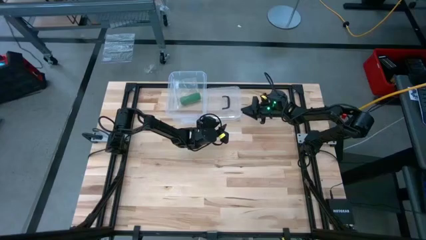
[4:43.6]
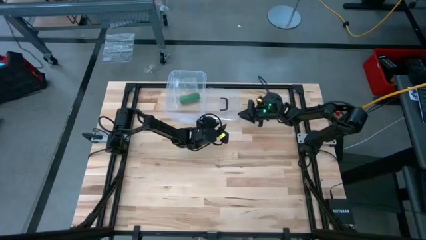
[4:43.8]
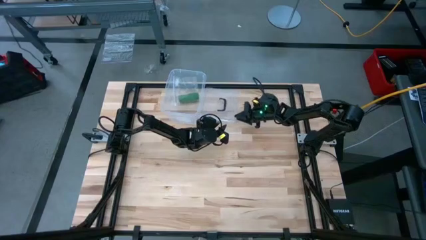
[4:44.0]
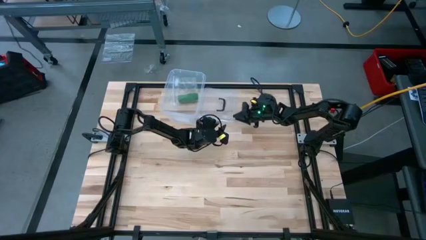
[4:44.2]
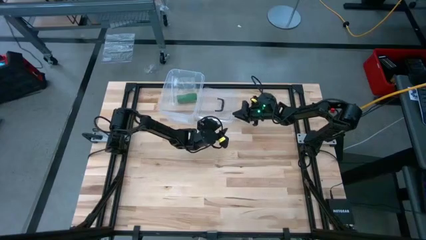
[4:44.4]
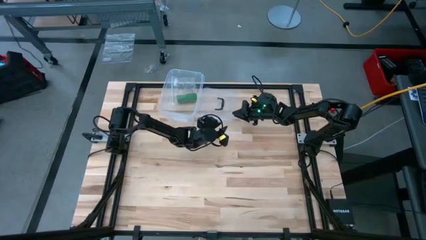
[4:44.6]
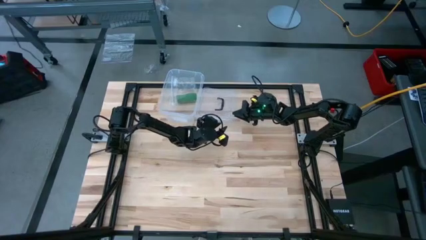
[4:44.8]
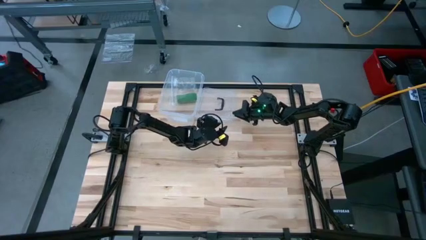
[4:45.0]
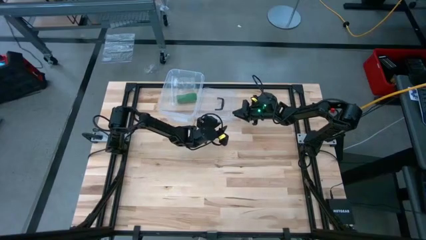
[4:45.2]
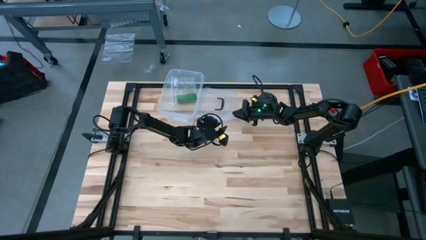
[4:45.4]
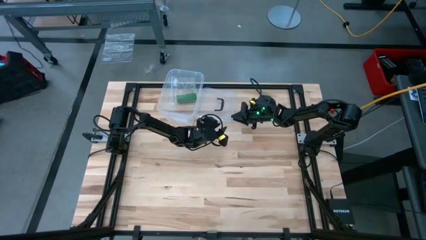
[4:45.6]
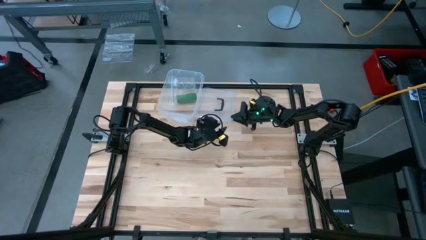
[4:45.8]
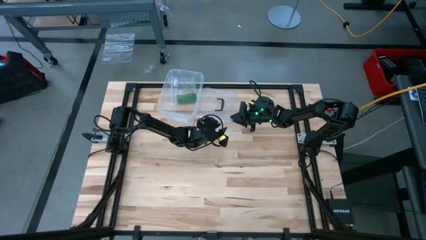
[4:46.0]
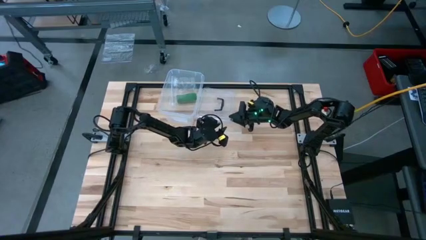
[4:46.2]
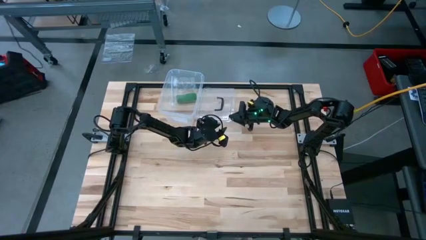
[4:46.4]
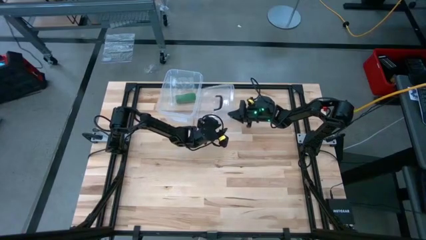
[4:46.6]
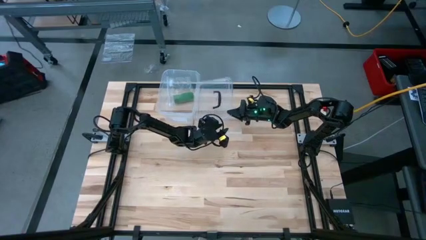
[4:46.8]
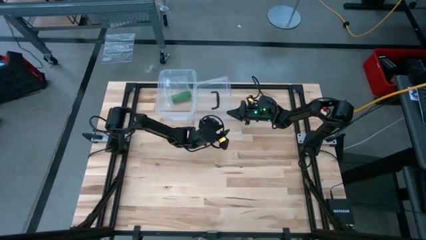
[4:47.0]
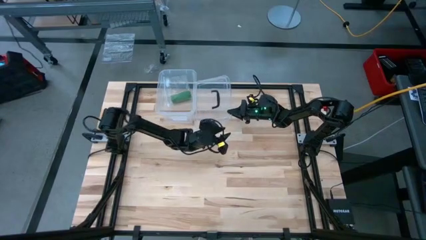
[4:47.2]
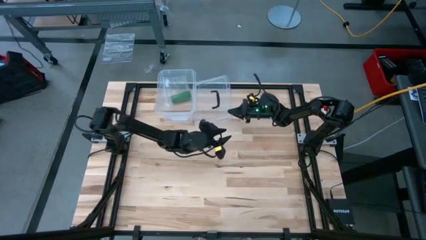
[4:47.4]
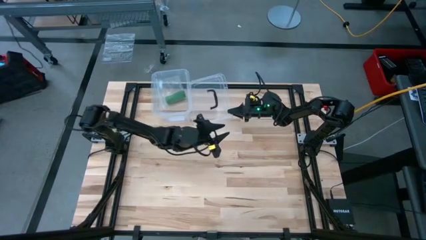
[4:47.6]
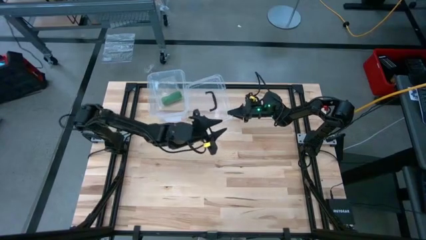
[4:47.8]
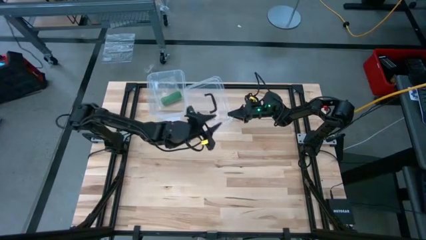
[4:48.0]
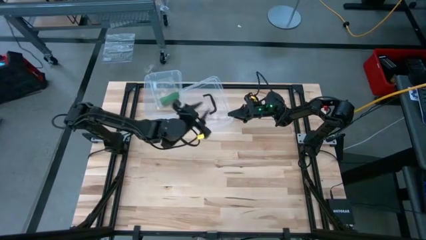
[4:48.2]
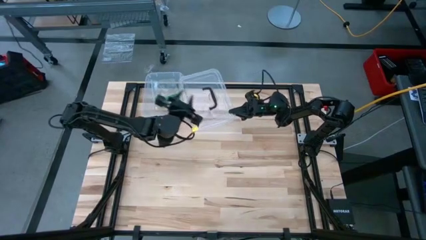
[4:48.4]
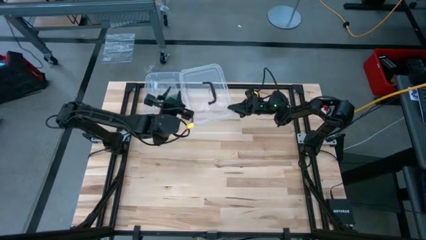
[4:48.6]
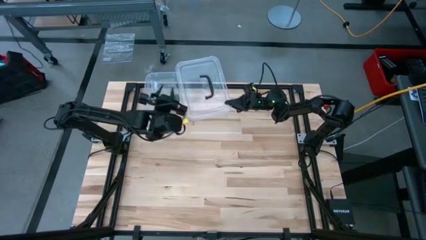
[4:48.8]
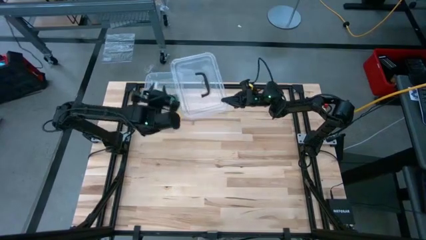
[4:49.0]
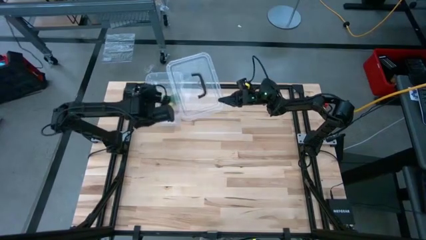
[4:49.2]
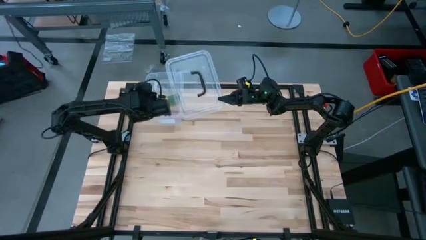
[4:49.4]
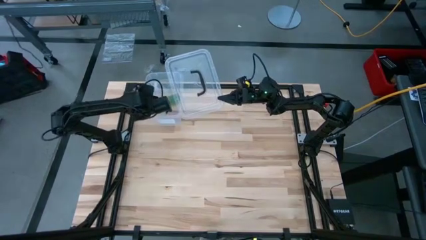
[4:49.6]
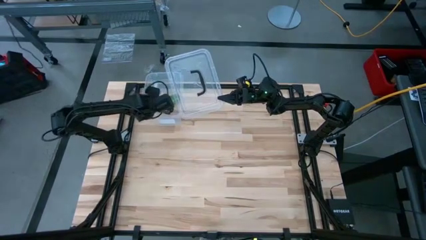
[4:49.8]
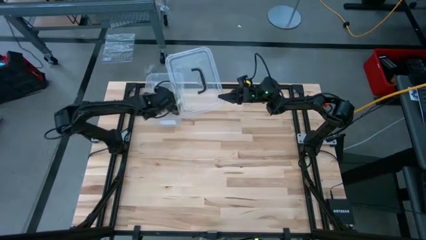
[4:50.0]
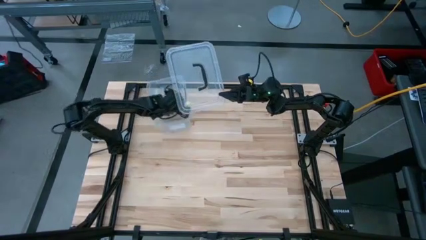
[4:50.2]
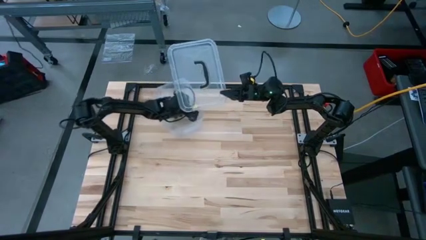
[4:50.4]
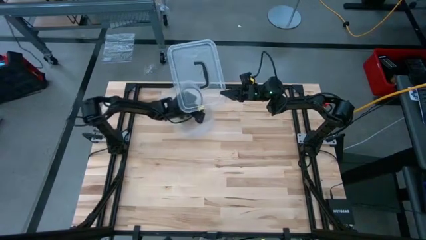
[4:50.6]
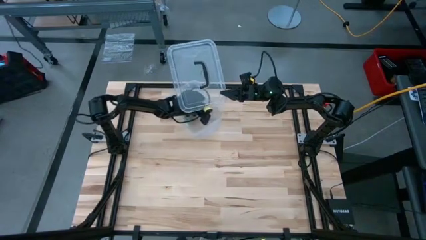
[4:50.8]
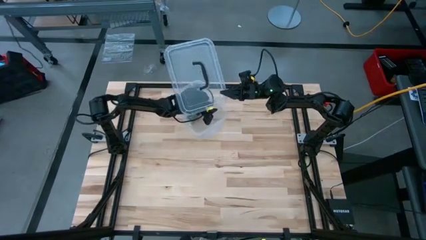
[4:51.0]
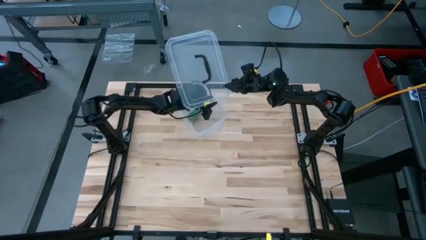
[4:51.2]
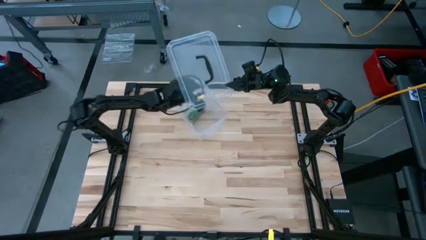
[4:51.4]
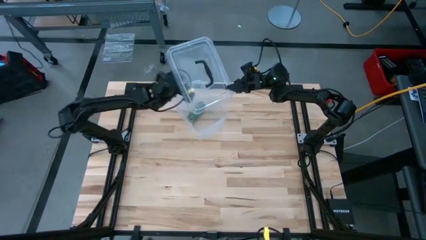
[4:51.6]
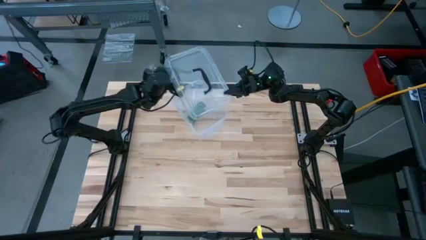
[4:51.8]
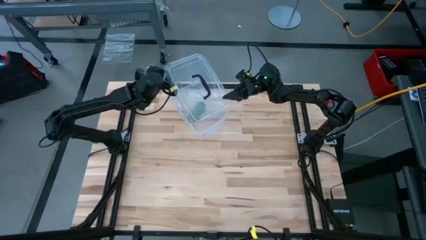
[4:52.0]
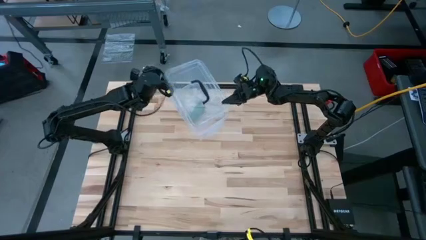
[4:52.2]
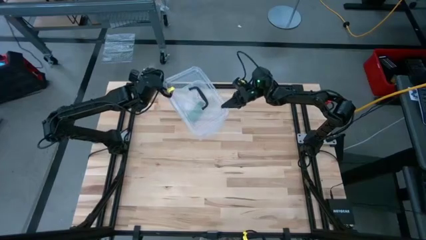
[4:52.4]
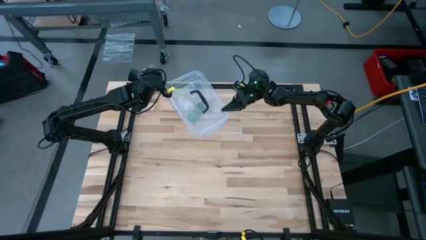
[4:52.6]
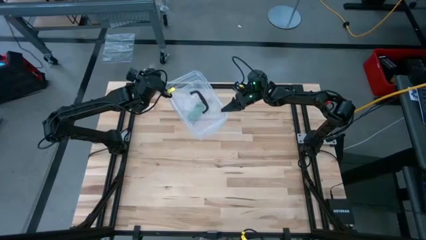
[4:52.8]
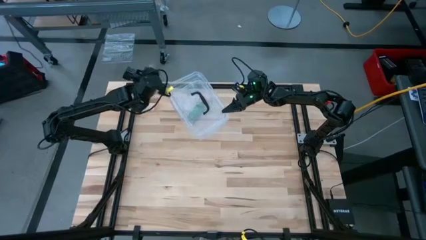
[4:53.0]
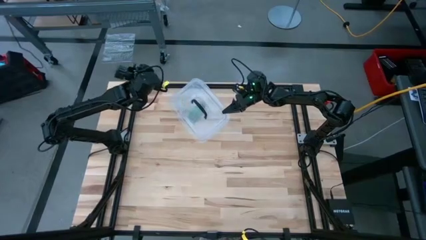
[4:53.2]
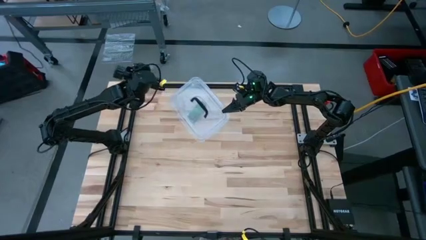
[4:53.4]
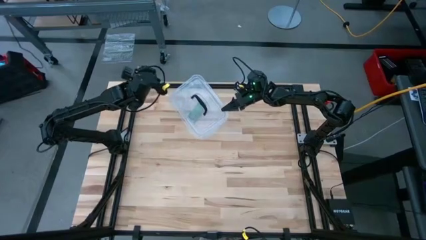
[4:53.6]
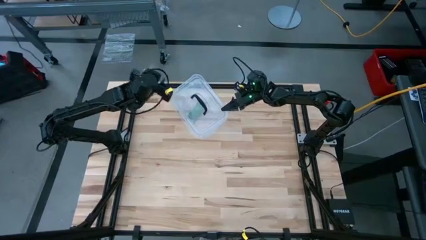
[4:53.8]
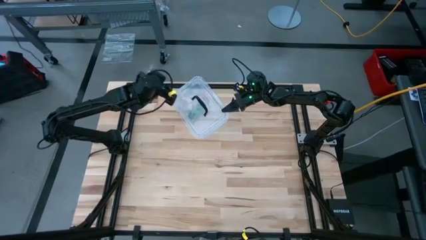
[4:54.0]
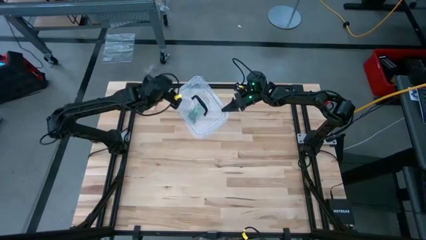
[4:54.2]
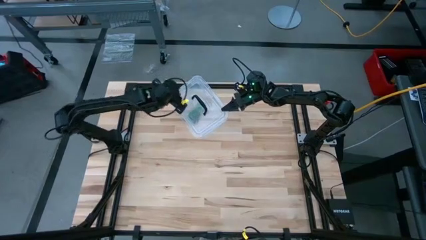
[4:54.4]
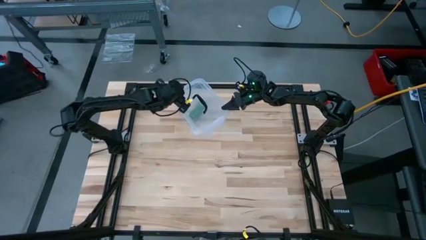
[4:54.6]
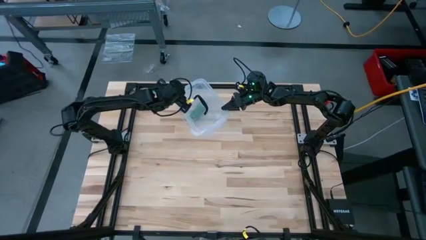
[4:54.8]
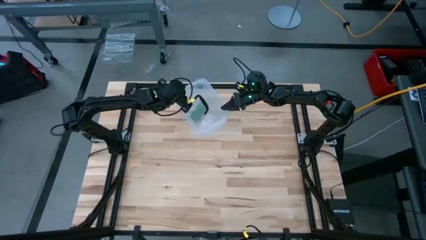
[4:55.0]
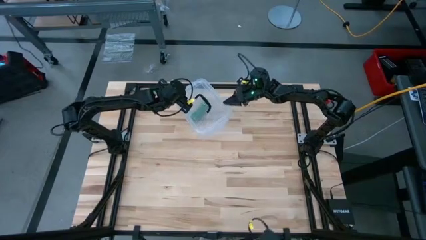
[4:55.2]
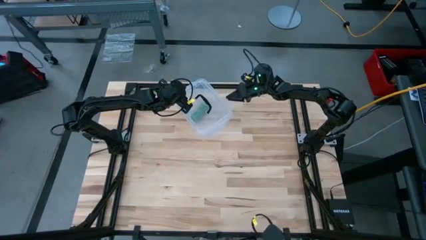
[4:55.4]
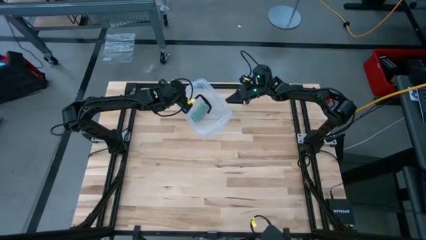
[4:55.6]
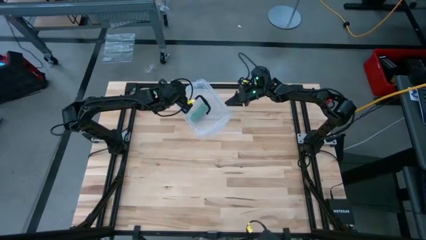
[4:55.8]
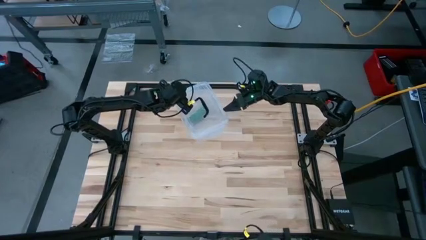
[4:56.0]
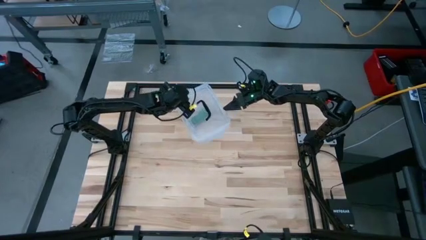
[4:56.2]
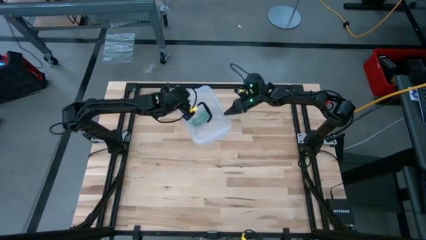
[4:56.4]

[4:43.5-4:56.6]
Task: Roll bandage
Close the transparent bin

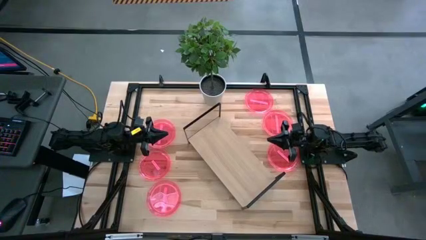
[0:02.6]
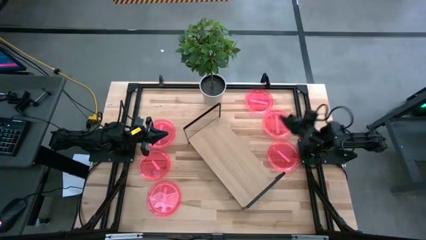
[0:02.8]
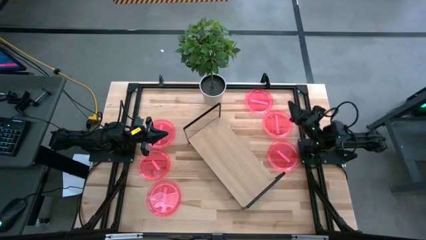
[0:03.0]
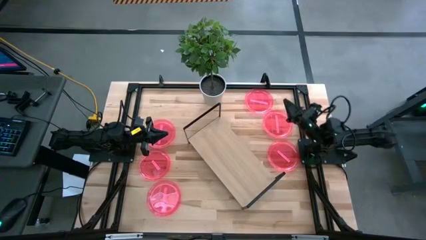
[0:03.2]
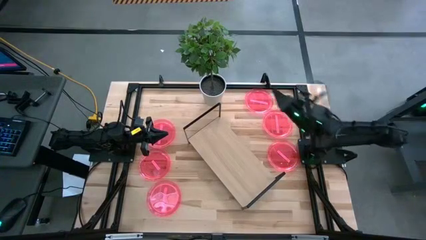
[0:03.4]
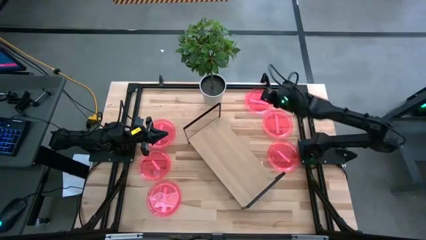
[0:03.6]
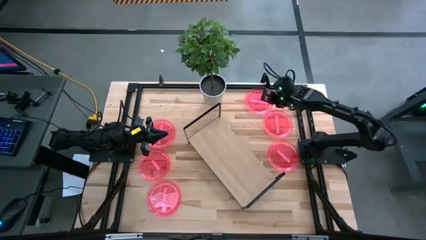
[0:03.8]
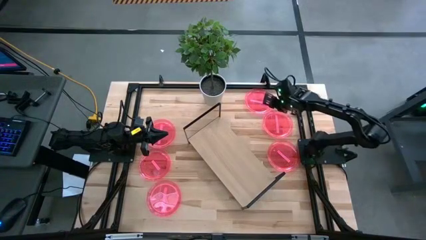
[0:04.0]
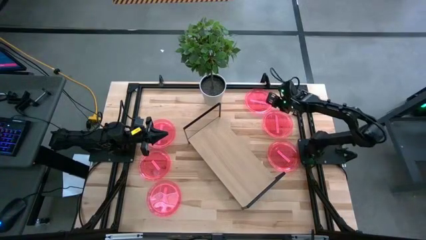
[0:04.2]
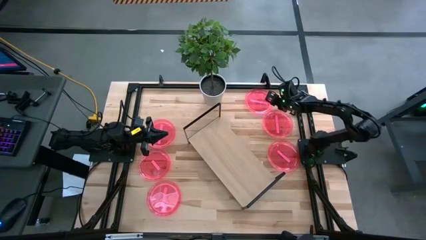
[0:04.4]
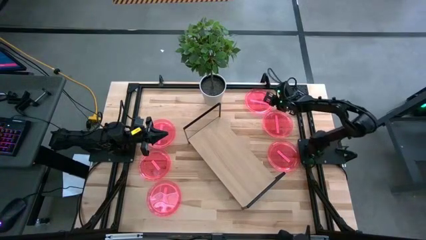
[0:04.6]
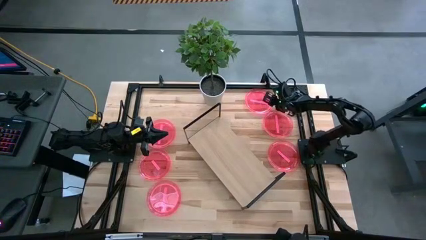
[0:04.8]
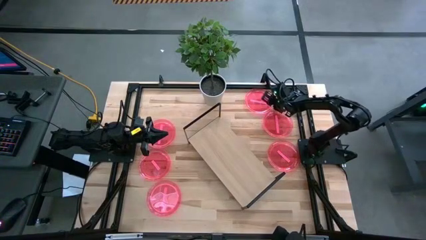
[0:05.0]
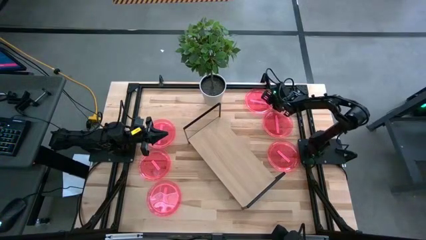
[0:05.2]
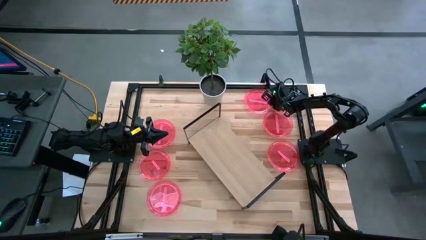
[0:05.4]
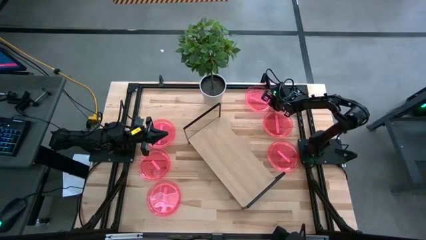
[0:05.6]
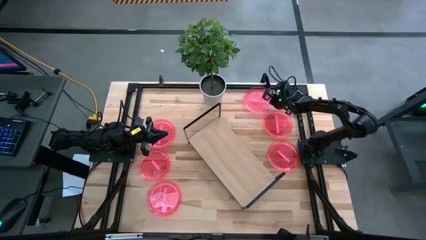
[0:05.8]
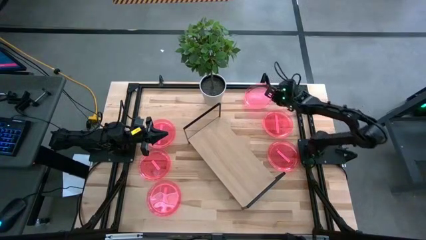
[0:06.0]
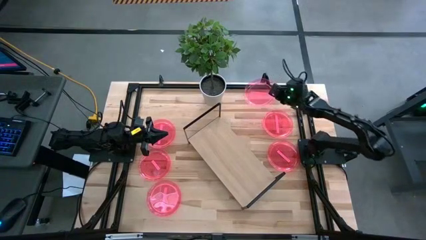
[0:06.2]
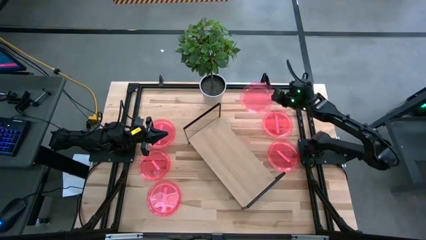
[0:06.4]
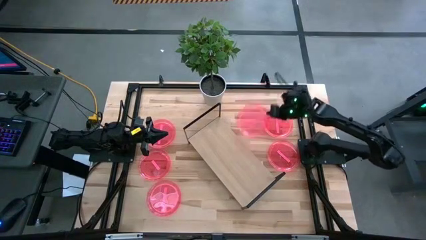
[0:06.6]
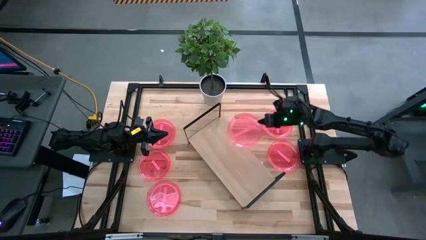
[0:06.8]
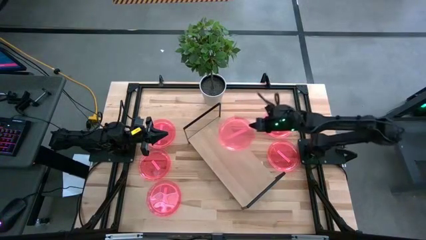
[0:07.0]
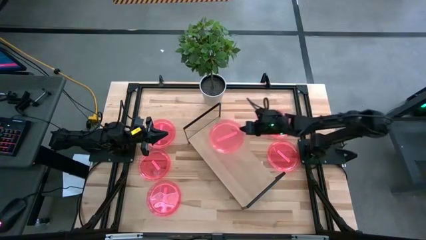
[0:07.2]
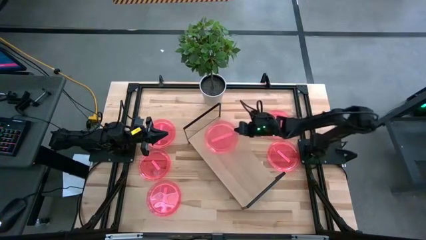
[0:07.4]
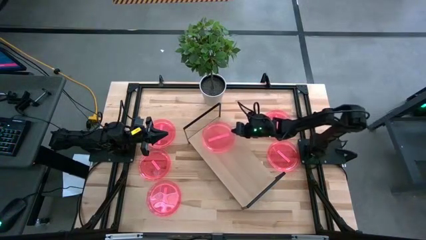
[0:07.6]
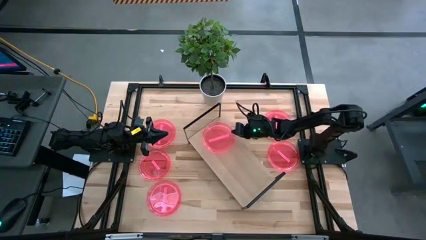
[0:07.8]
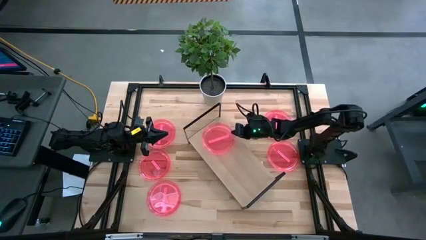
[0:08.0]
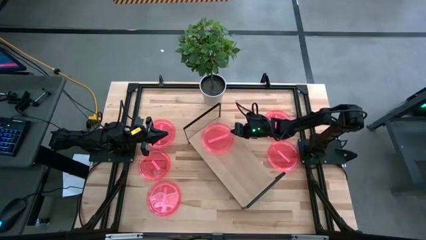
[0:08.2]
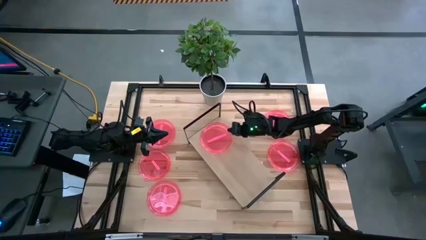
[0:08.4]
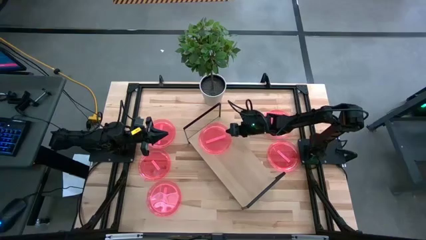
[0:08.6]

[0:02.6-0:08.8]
Task: Place and stack plates onto a shelf
Put the pink plate on the shelf
